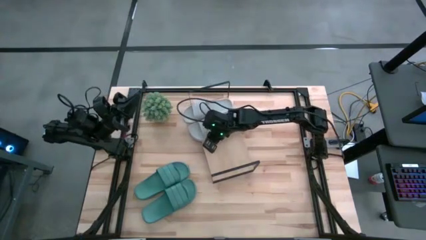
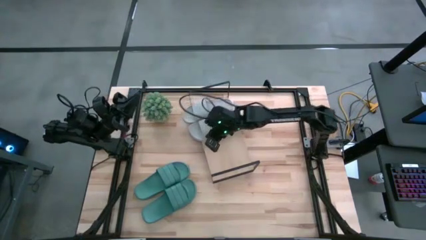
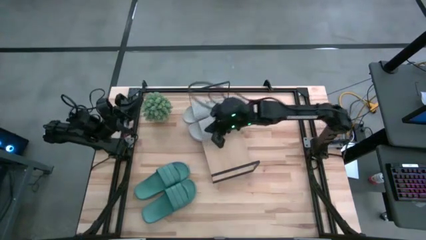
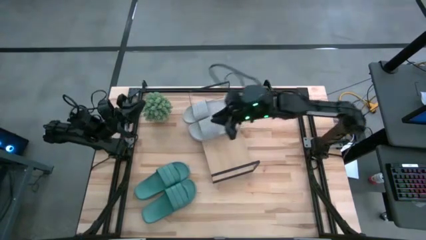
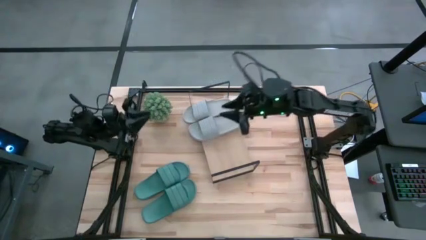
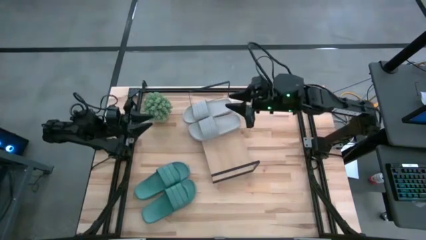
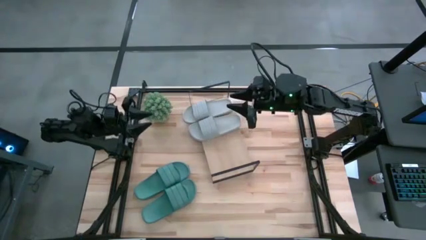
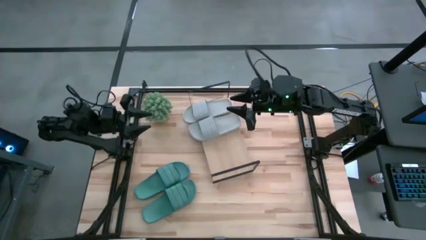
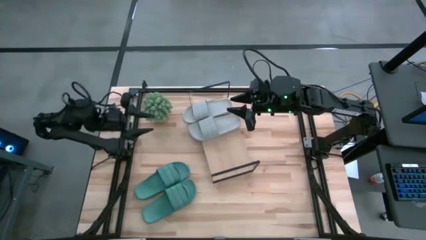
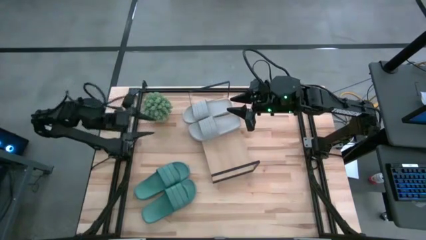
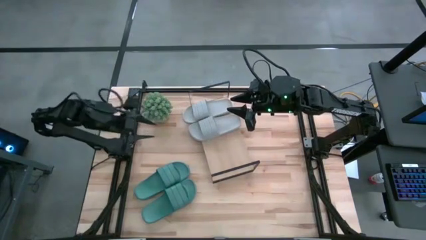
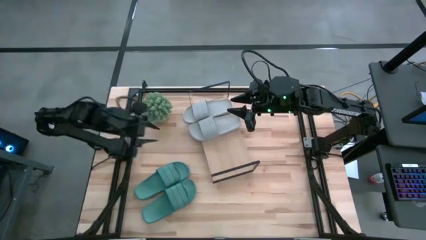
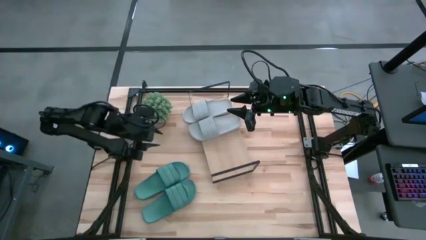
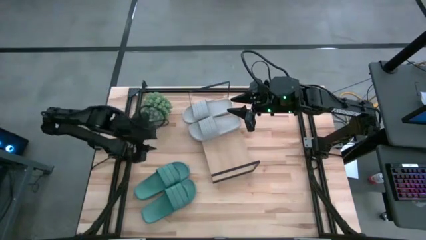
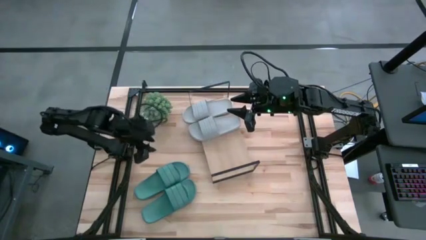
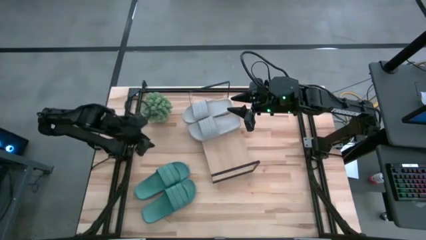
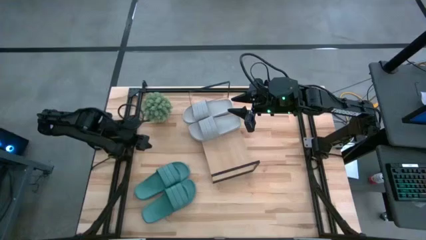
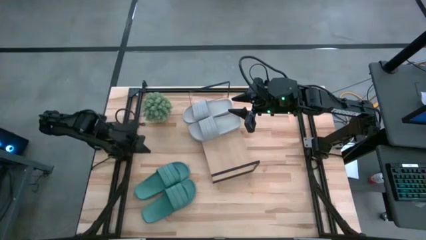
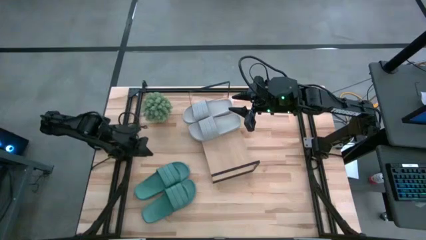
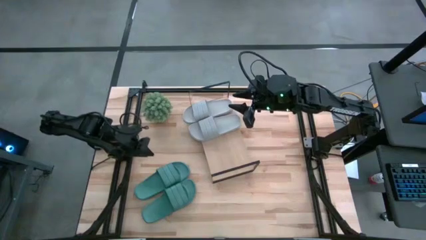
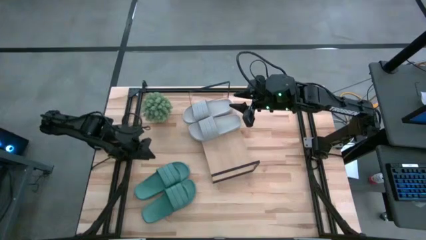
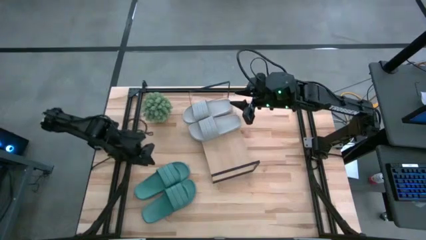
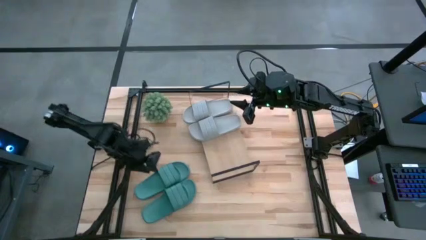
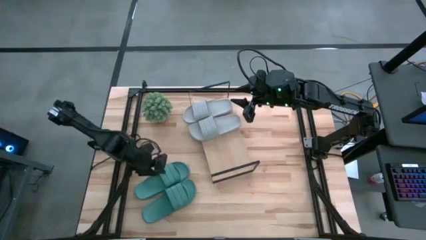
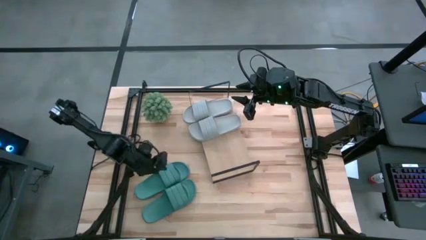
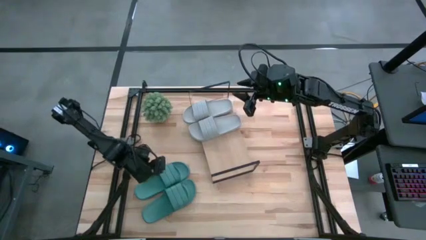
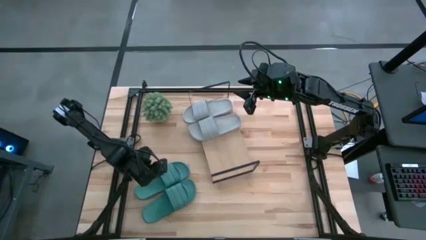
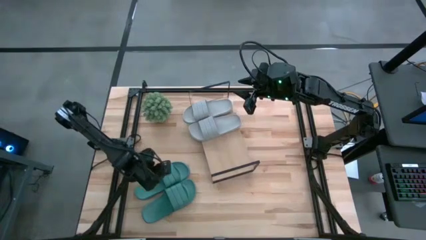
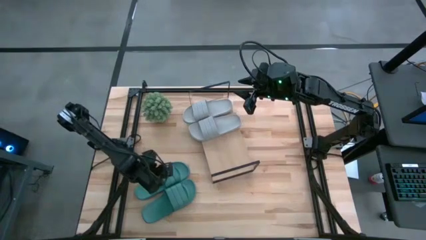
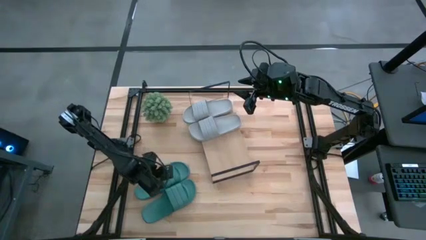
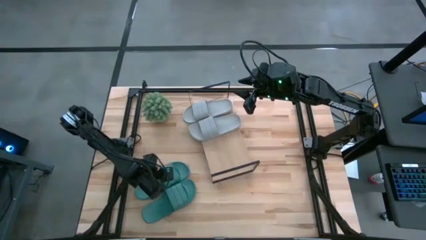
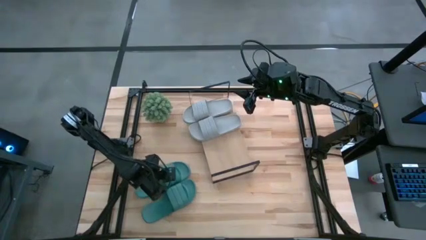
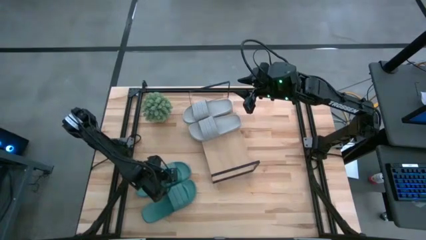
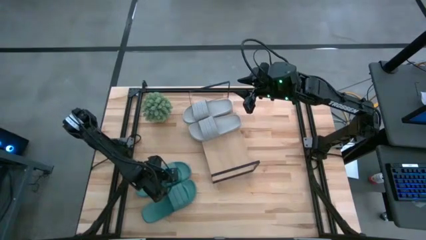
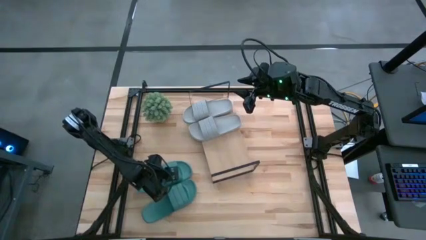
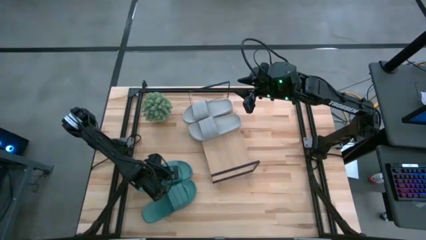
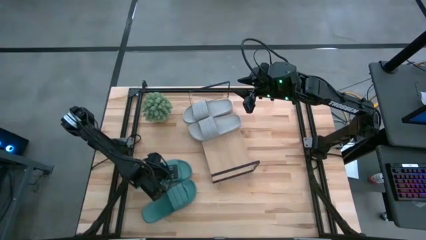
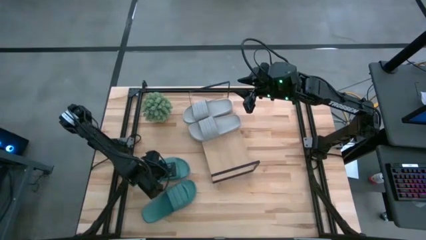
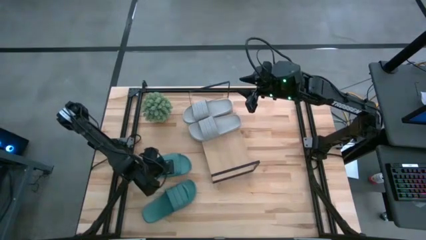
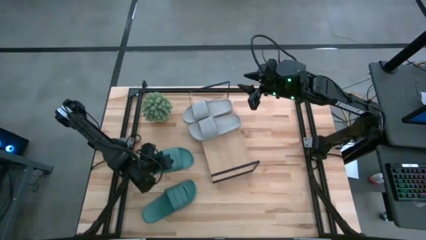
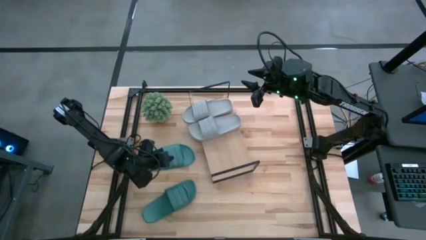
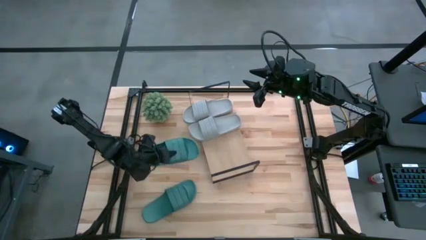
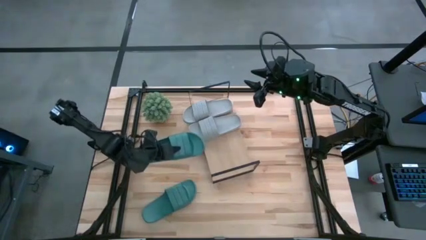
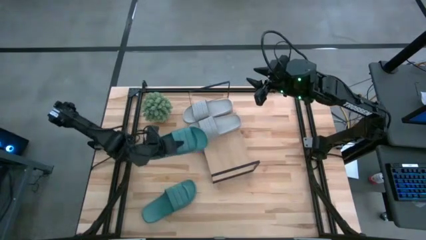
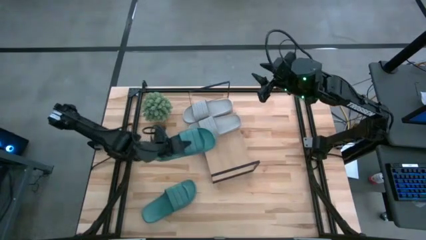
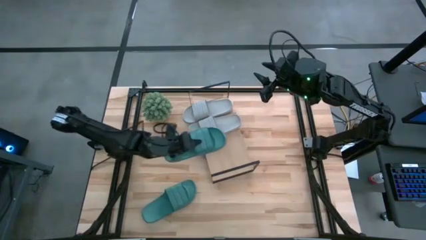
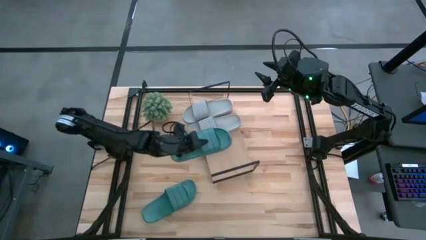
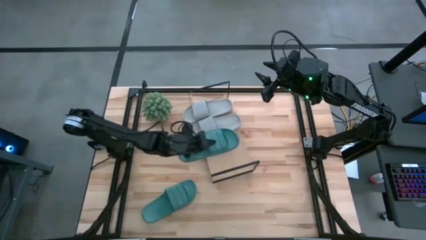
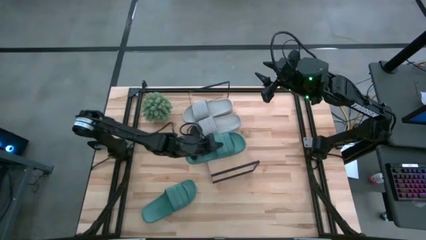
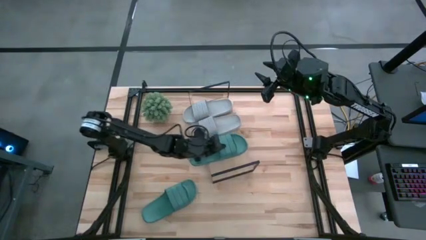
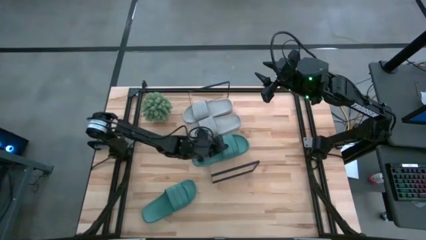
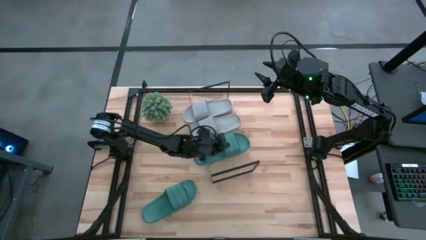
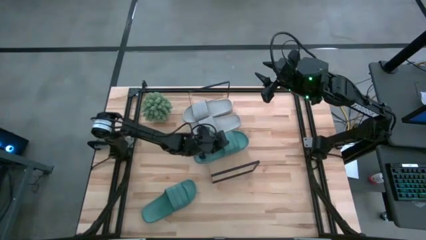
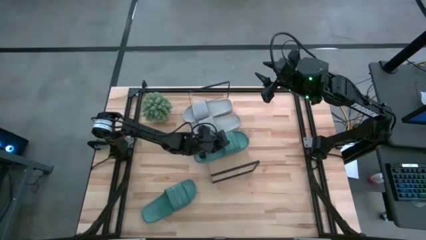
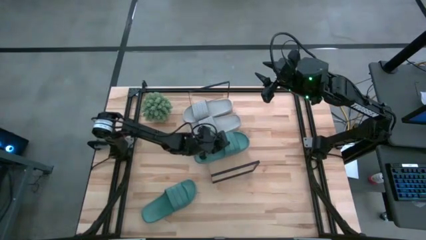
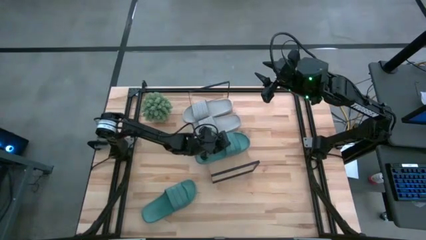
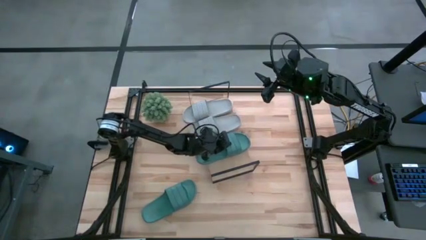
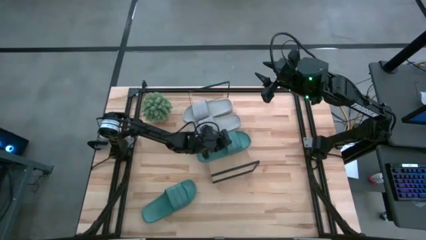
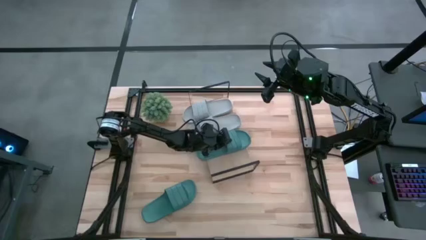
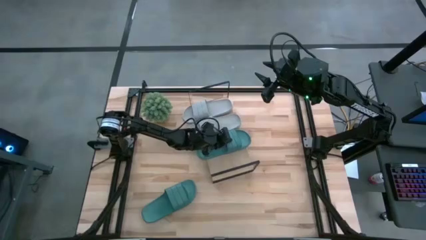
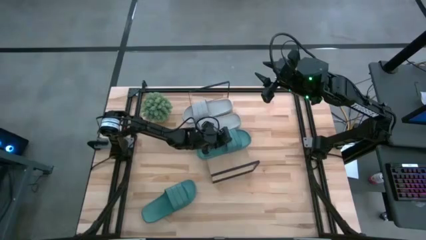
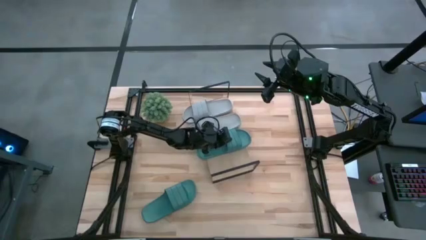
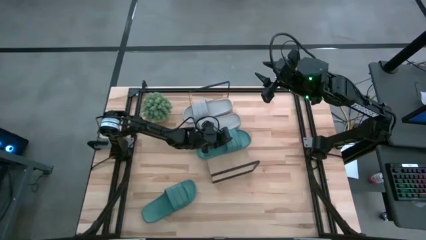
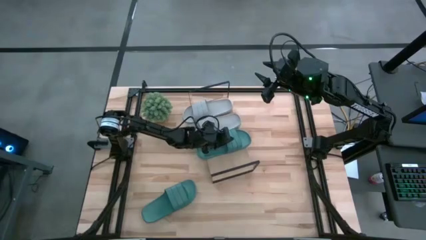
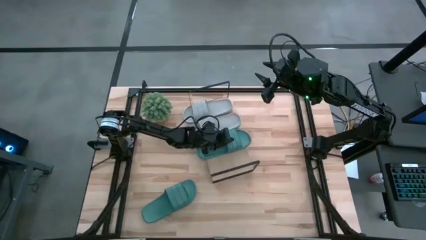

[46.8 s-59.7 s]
Task: Pick and place slides into the shelf
Put the top green slipper on the shelf
